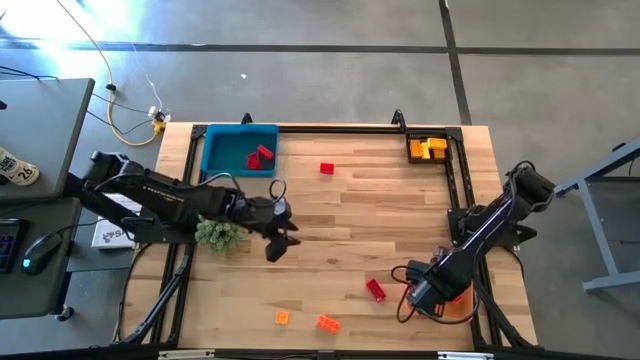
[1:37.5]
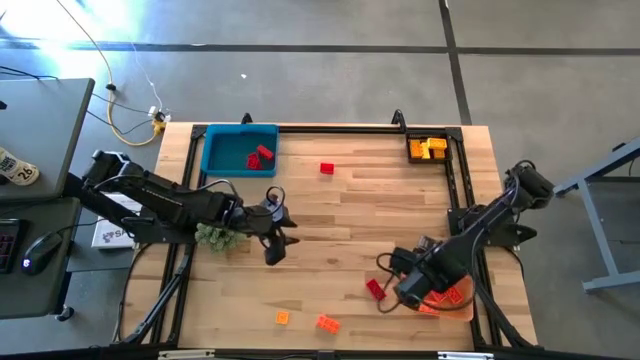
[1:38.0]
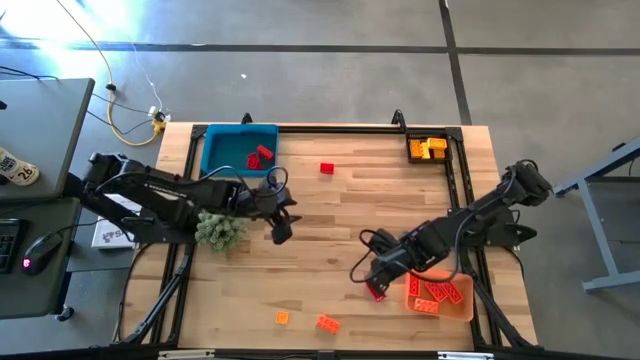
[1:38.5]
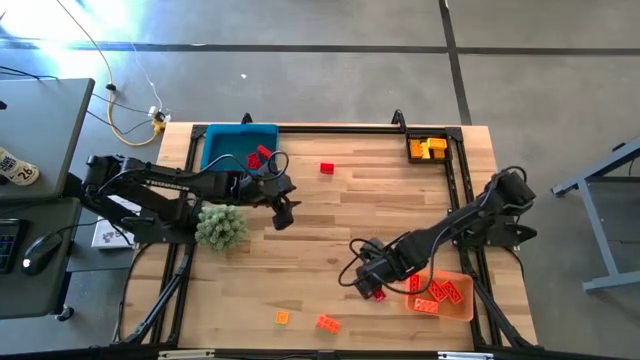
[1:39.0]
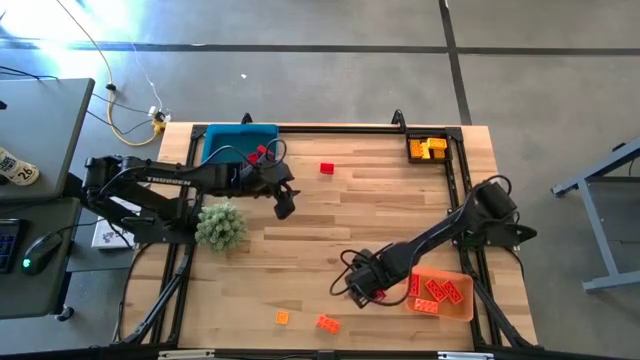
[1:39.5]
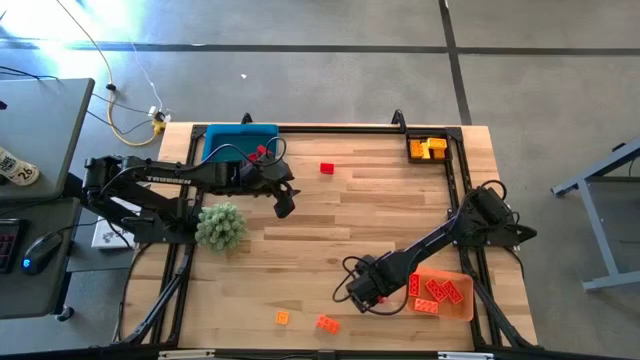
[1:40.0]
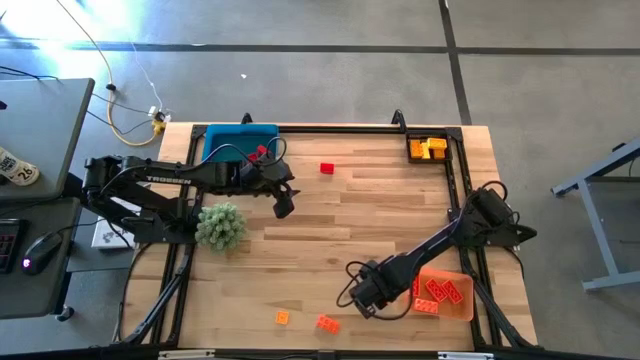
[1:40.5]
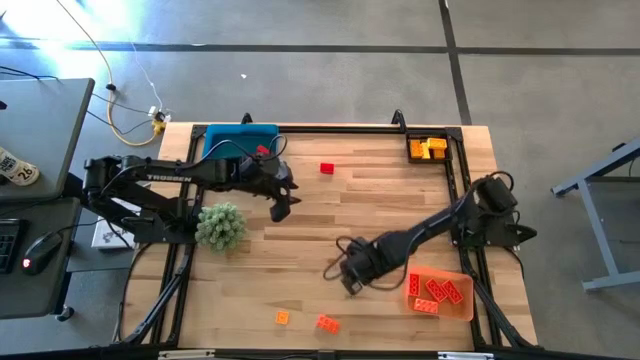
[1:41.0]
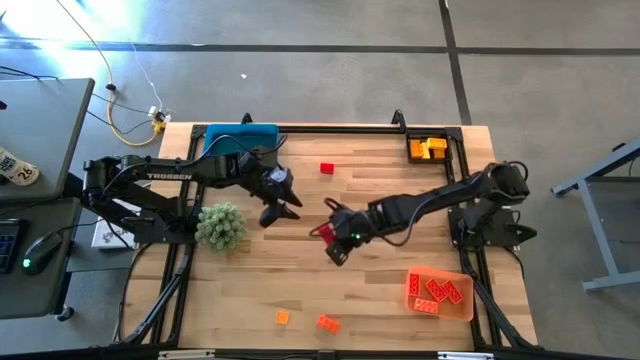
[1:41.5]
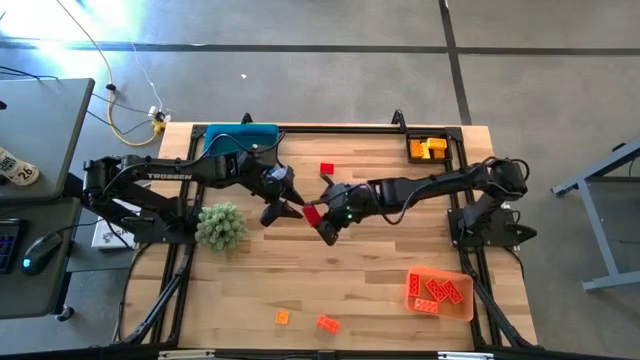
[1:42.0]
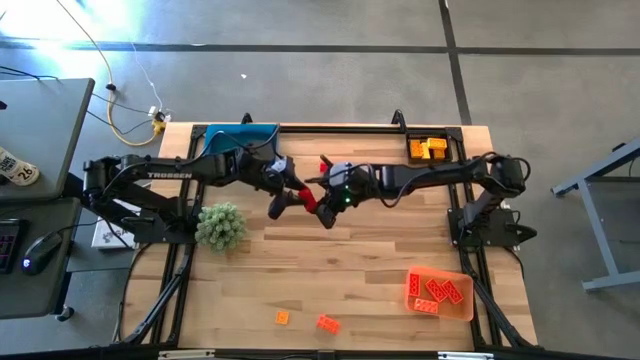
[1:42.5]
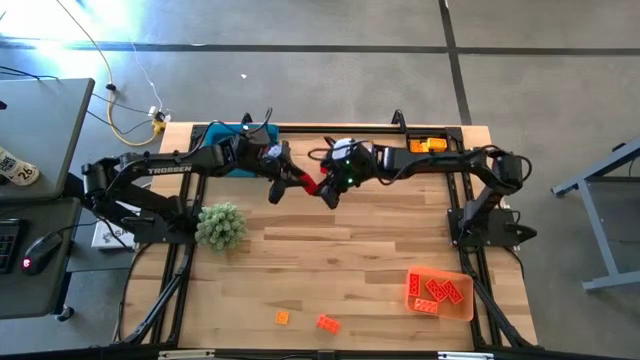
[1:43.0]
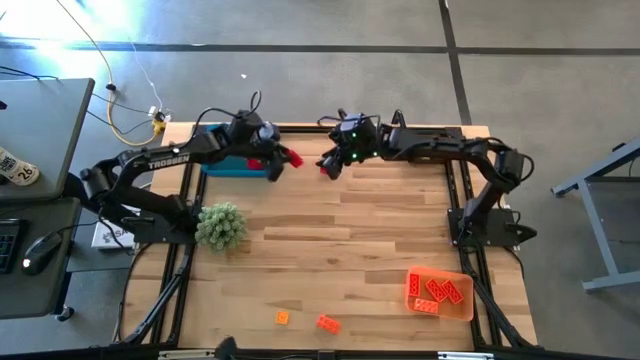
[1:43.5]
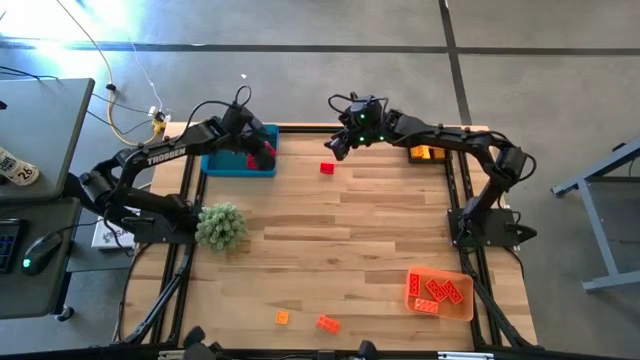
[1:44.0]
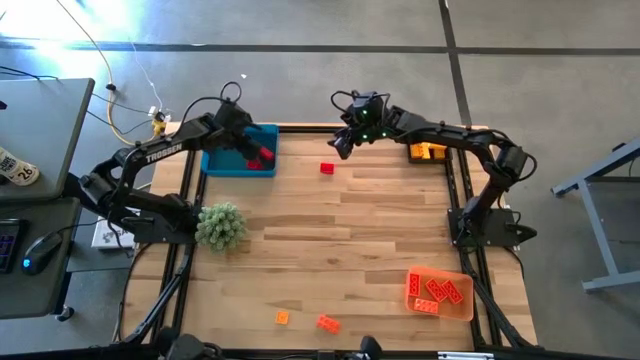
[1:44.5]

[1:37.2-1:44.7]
Task: Sort & place blocks by color
Put the red game piece into the blue bin

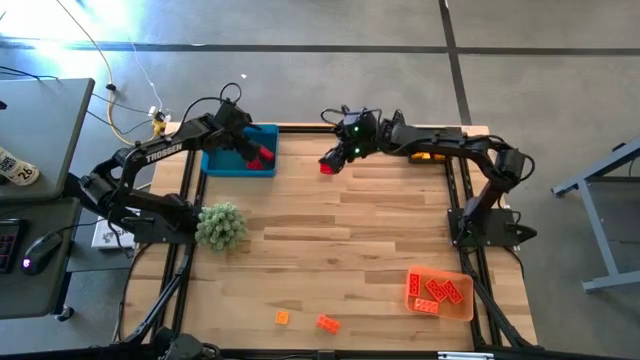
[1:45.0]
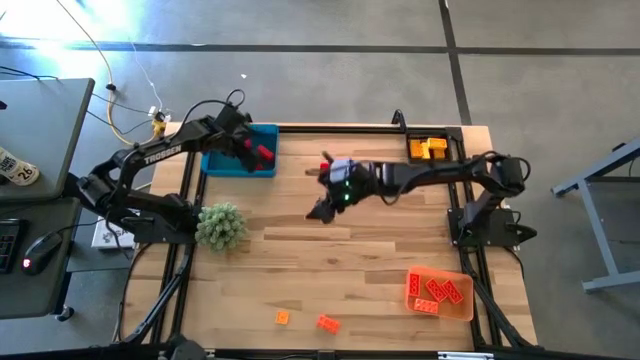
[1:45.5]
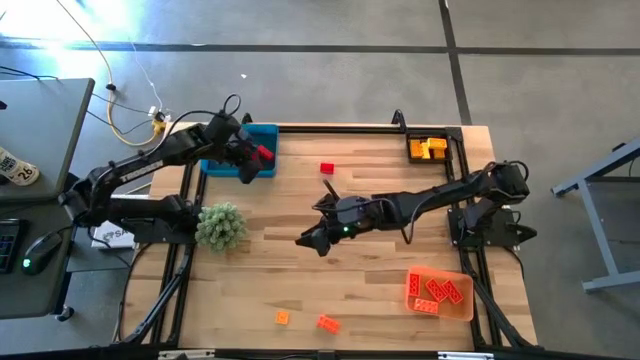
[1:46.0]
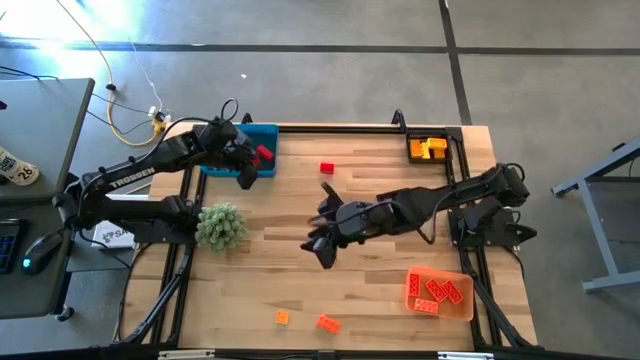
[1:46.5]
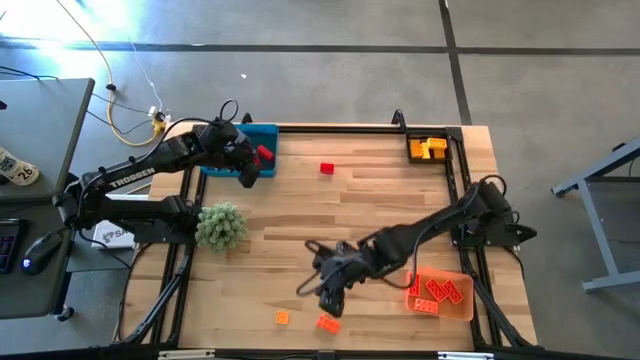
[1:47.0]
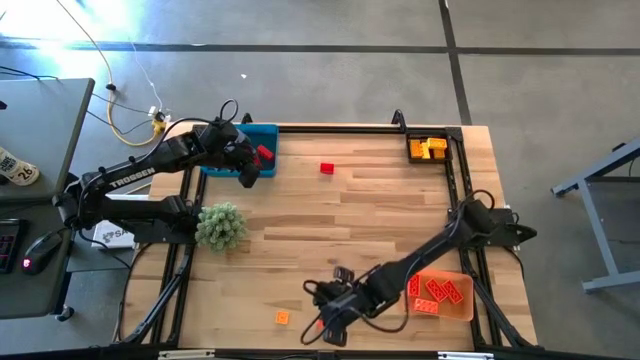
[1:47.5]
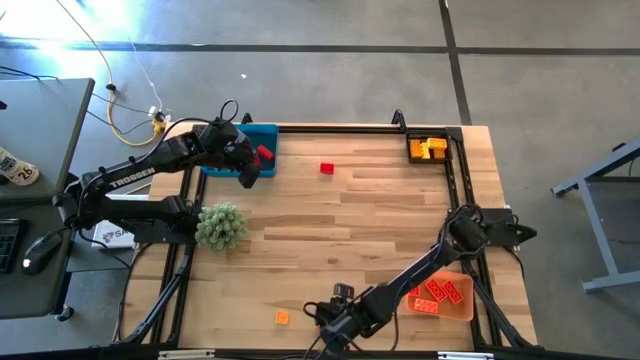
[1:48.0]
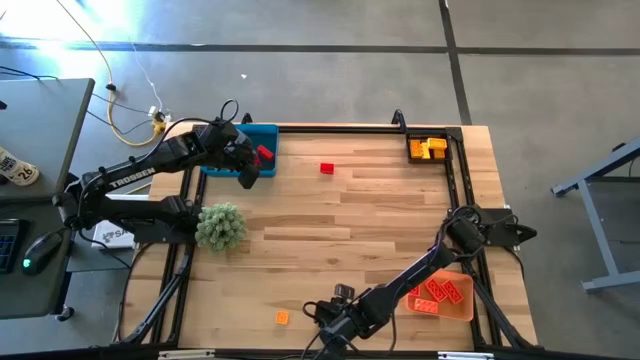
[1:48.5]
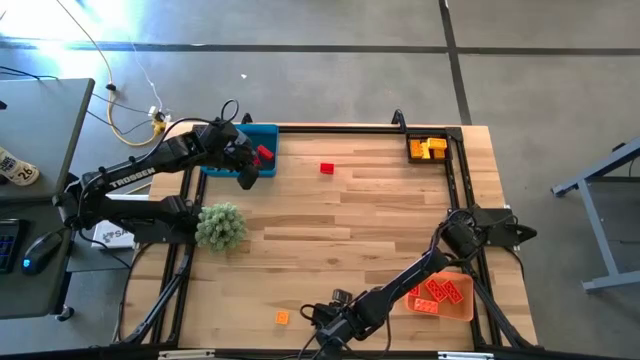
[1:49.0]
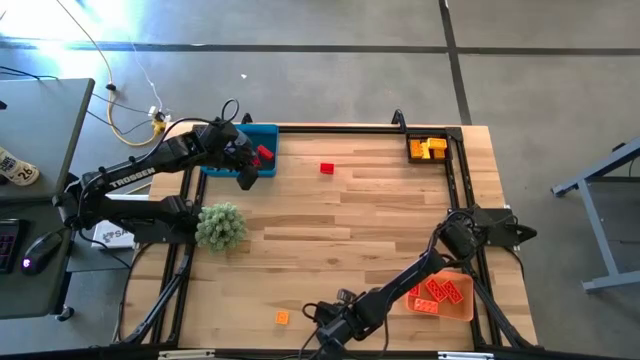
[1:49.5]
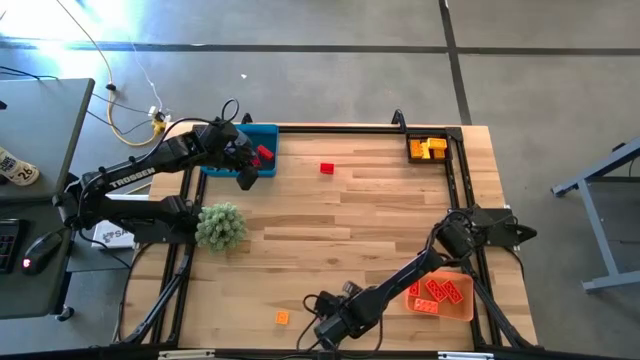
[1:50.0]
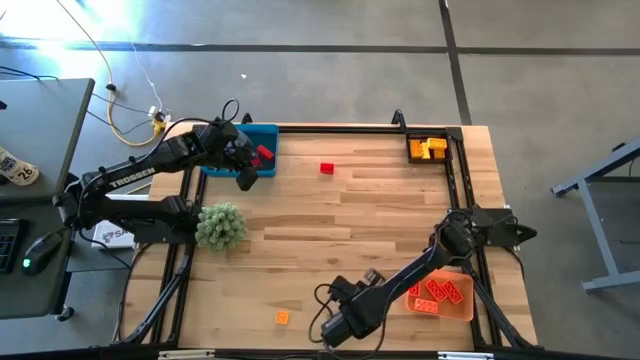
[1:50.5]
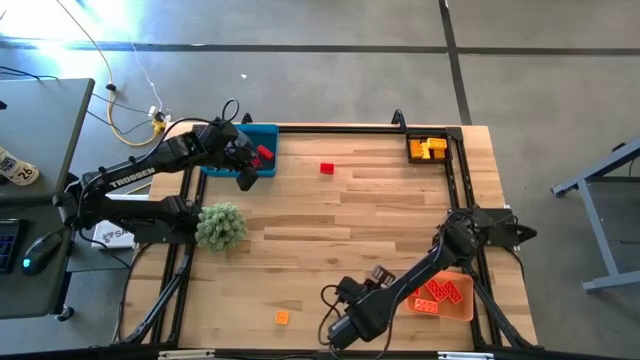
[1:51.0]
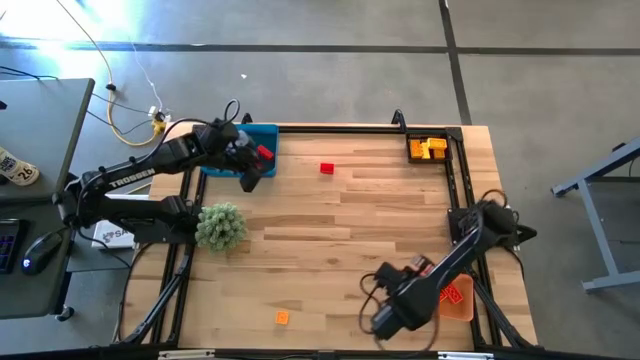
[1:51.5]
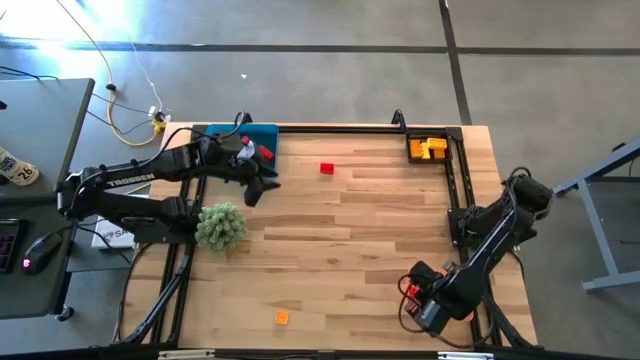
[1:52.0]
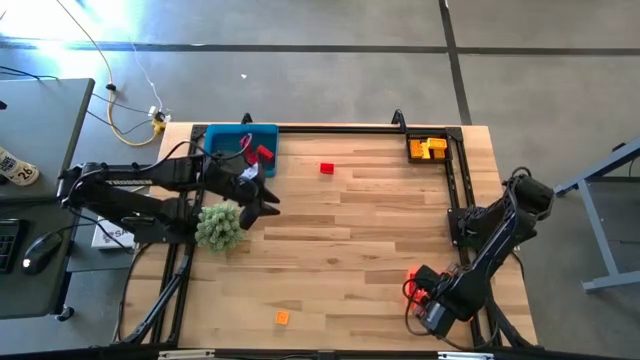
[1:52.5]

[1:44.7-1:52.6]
Put the orange game piece into the orange bin

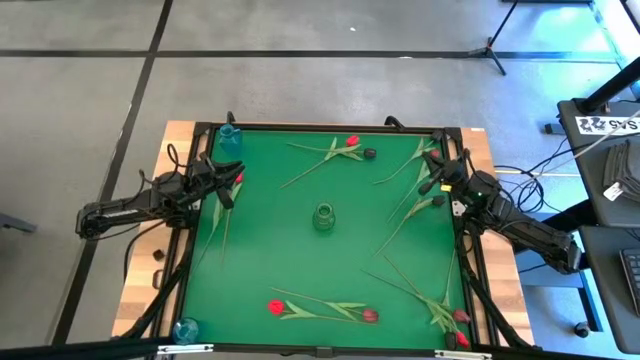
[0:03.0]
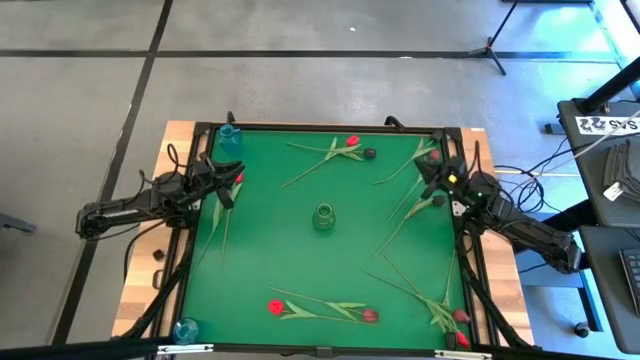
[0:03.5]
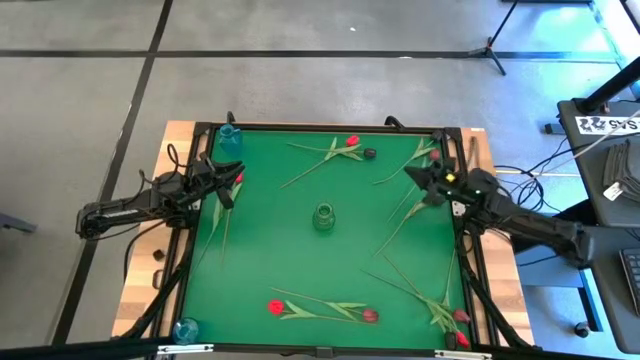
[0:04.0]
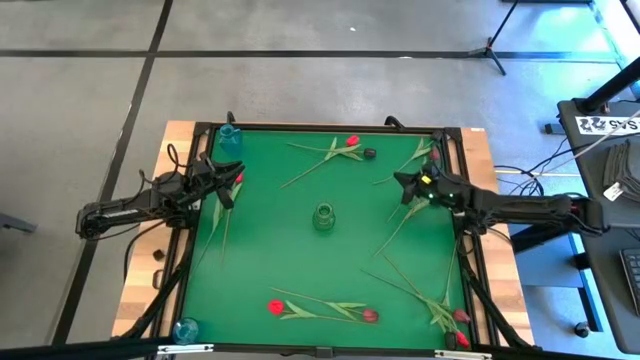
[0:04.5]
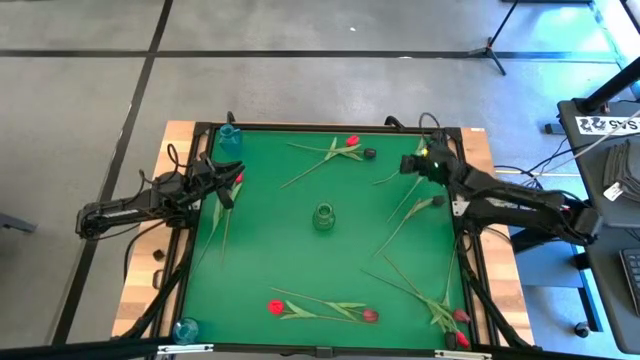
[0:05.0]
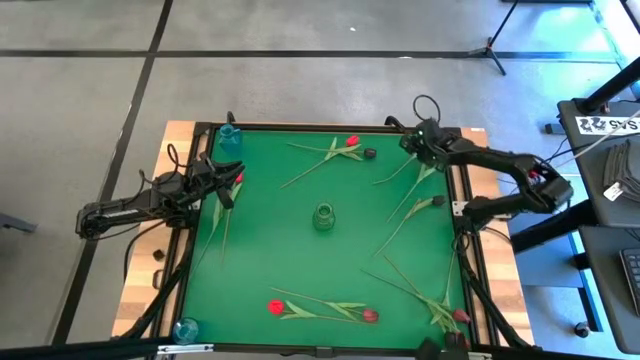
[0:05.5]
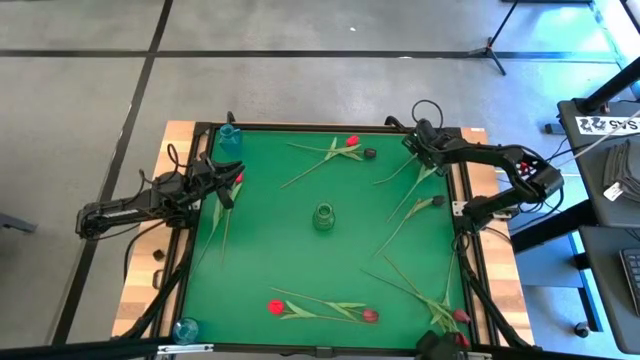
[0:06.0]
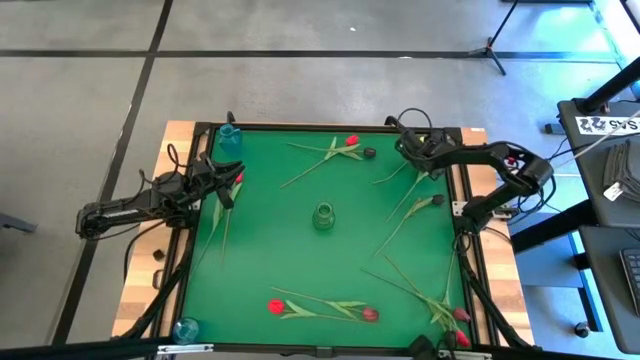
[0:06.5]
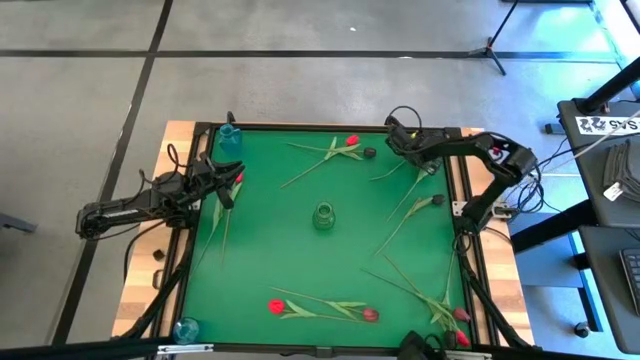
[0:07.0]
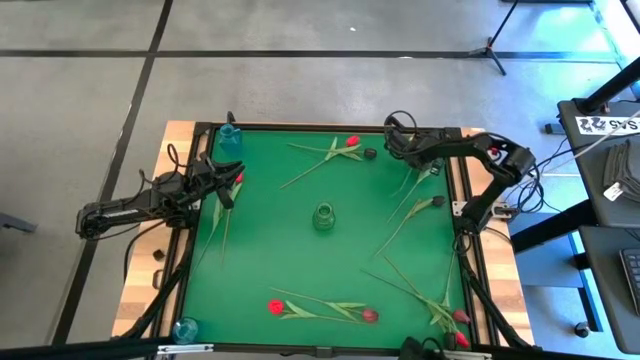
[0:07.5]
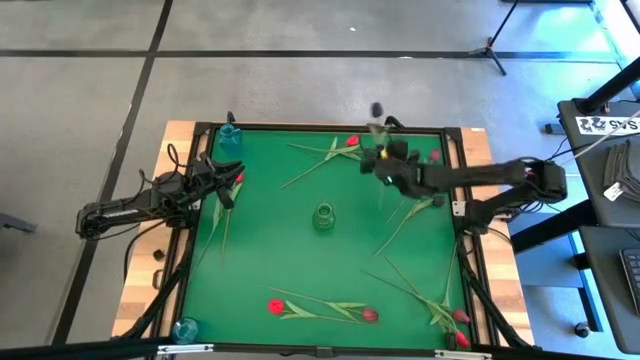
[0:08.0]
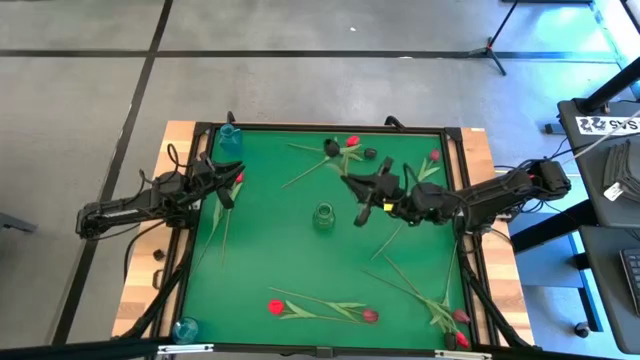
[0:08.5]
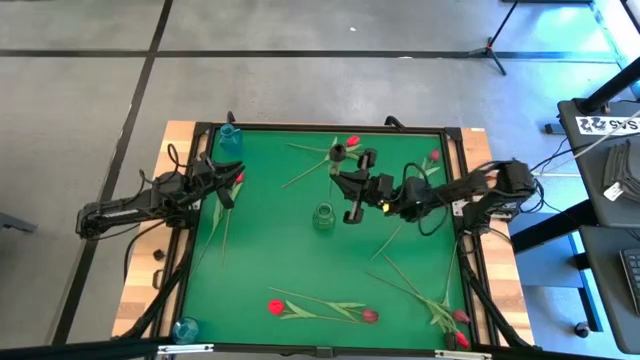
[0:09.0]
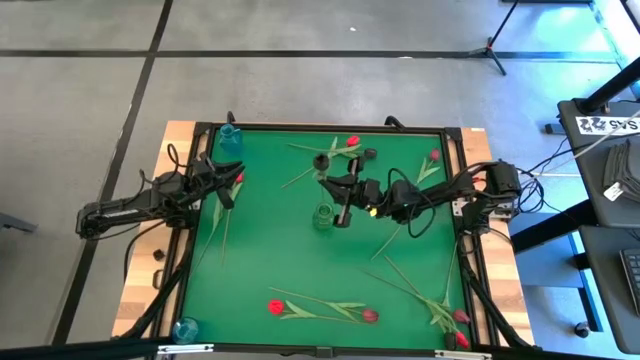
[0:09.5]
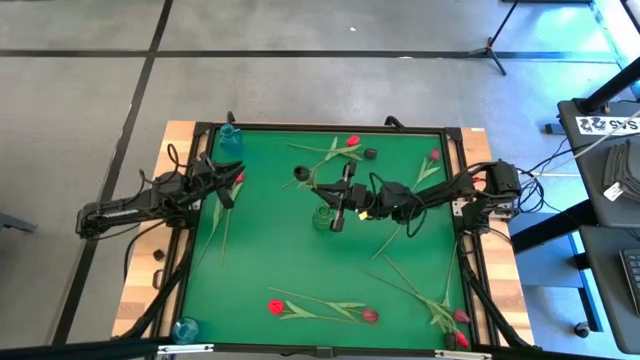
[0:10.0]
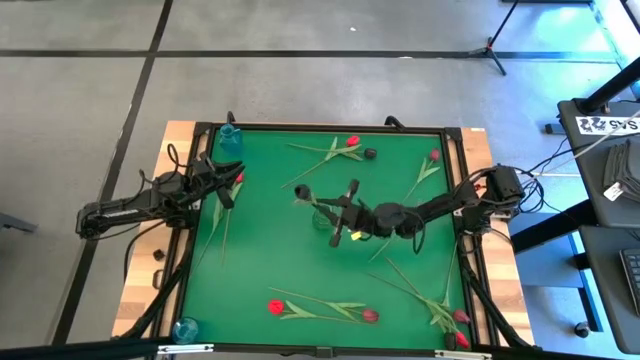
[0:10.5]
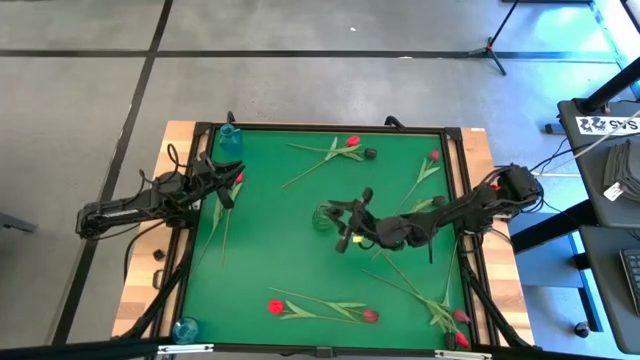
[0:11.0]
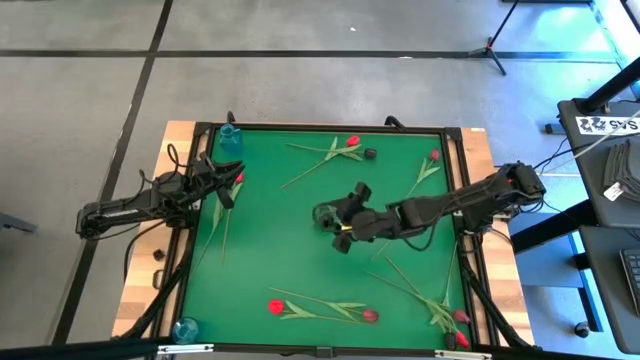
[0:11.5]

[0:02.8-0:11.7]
Task: Sort flowers into vase by color
Put the black tulip into the green vase
